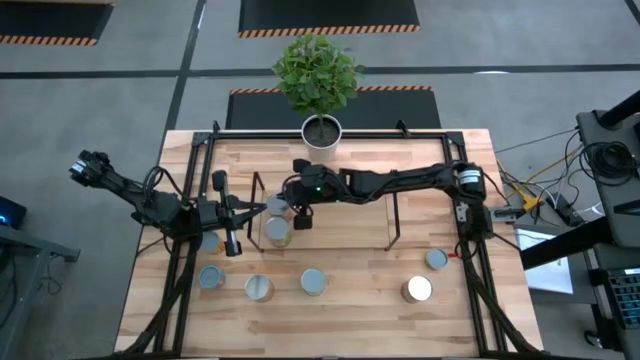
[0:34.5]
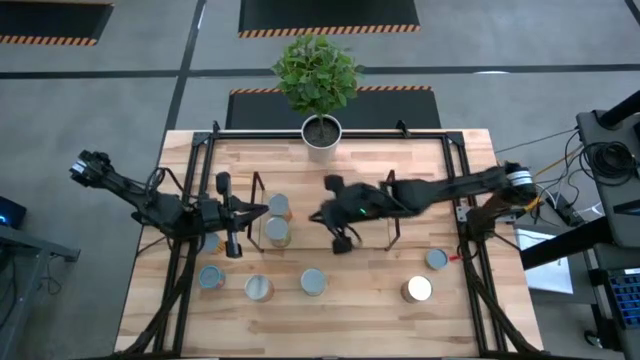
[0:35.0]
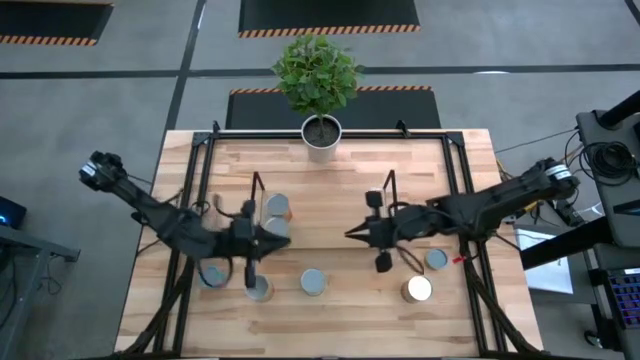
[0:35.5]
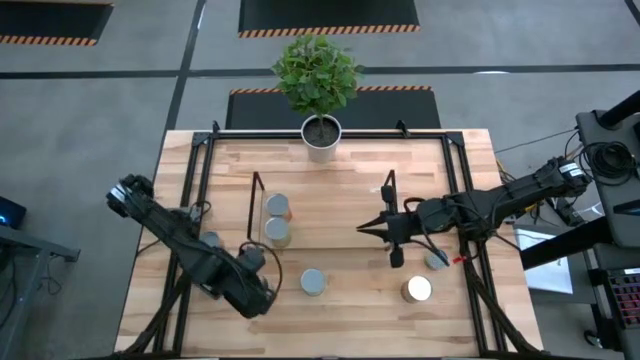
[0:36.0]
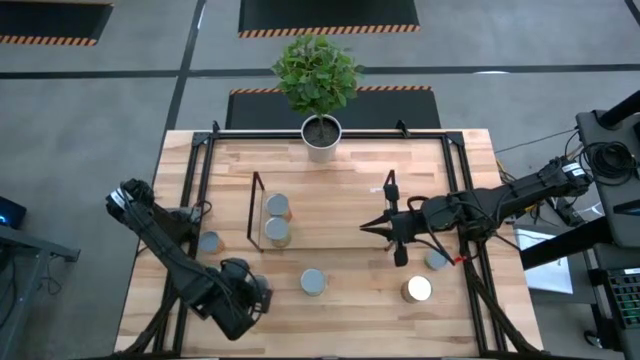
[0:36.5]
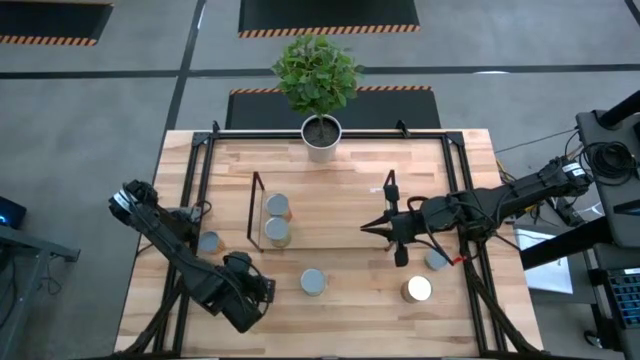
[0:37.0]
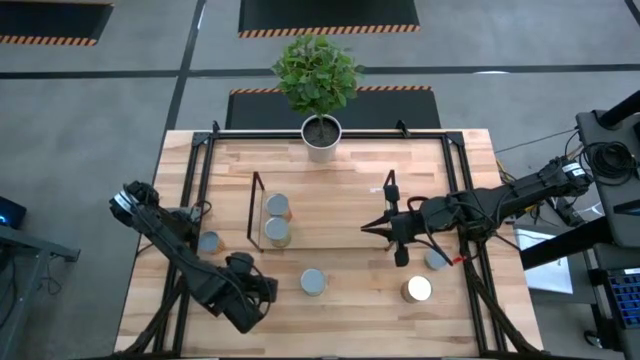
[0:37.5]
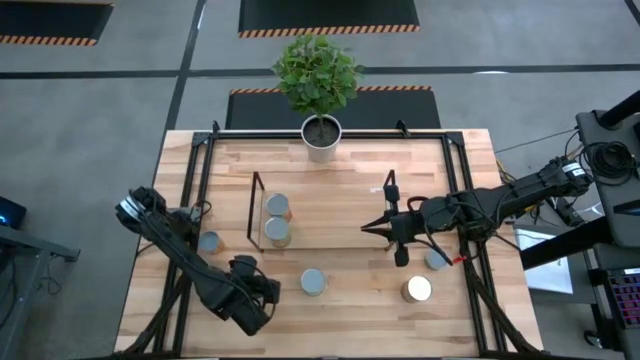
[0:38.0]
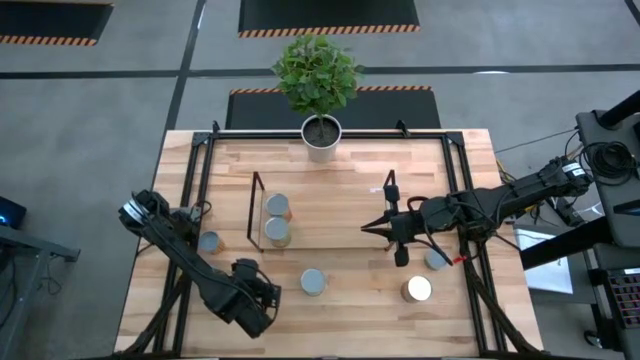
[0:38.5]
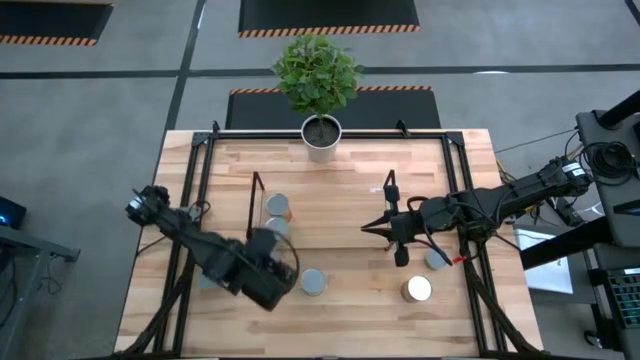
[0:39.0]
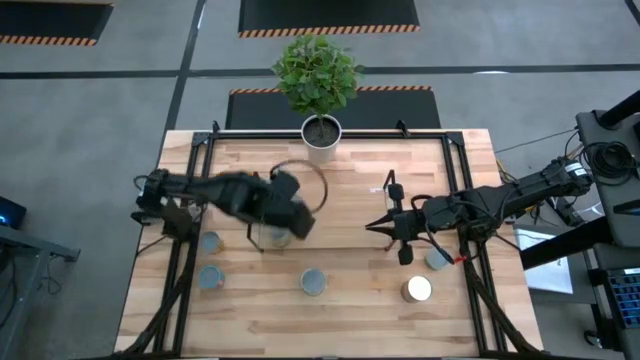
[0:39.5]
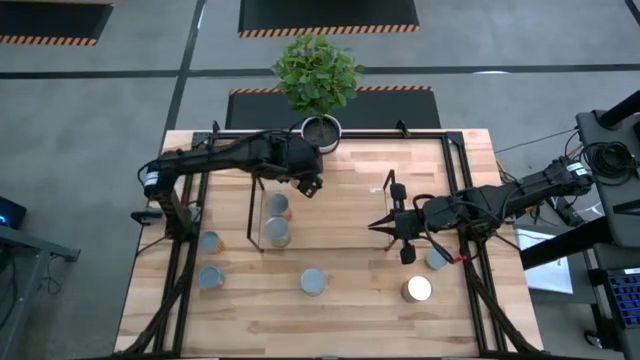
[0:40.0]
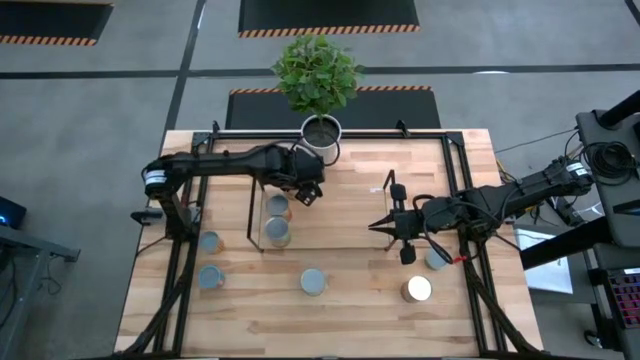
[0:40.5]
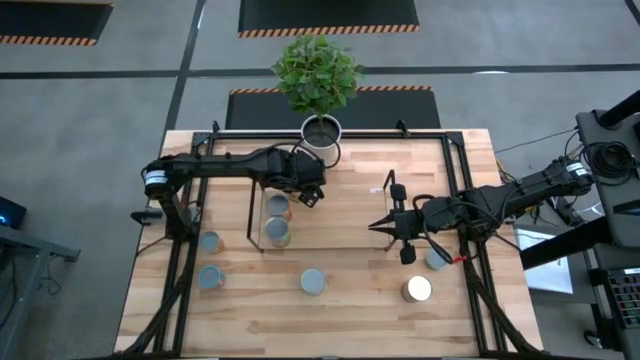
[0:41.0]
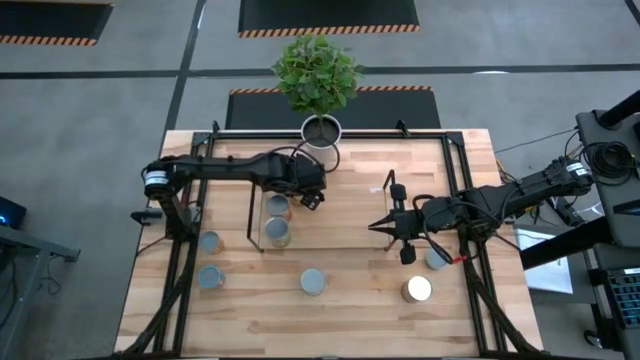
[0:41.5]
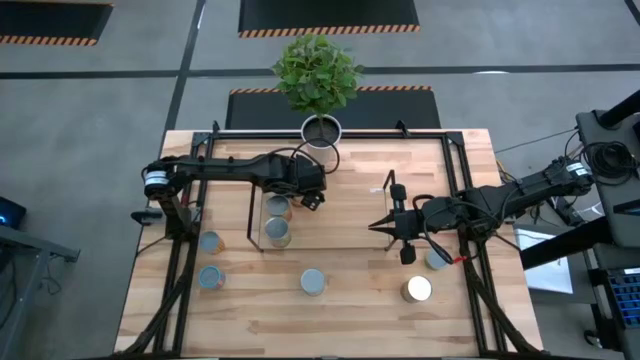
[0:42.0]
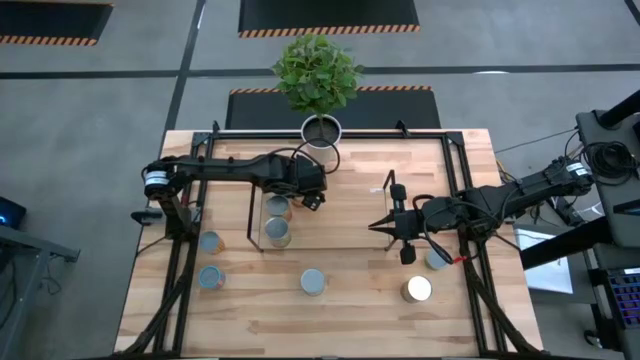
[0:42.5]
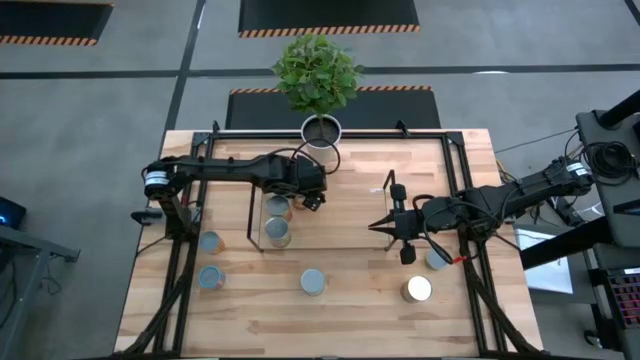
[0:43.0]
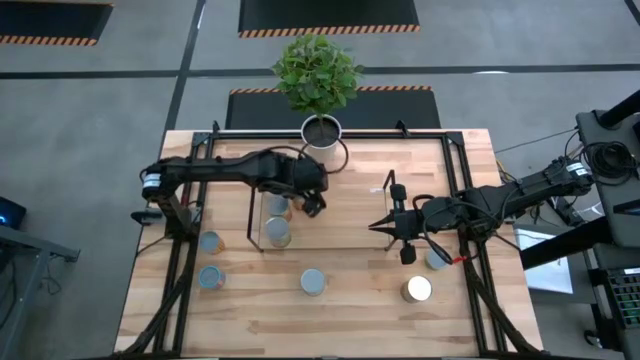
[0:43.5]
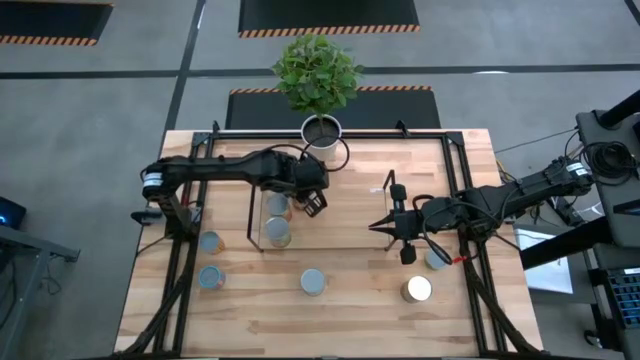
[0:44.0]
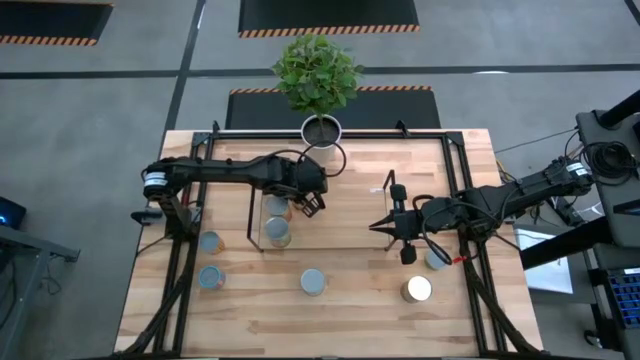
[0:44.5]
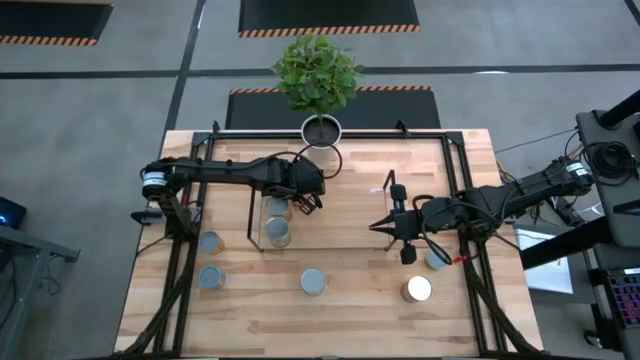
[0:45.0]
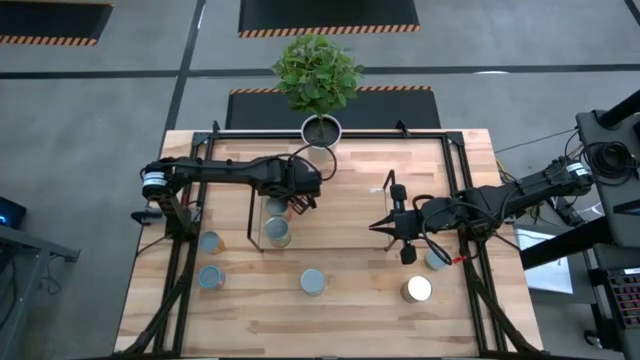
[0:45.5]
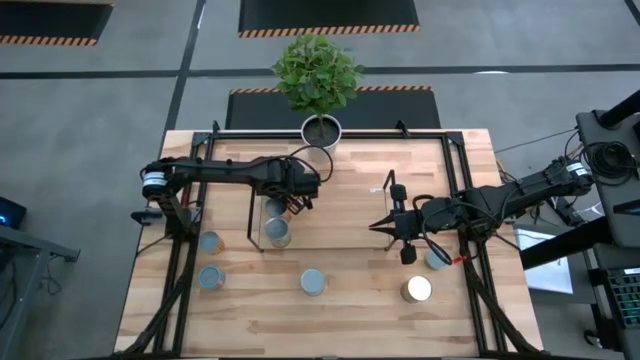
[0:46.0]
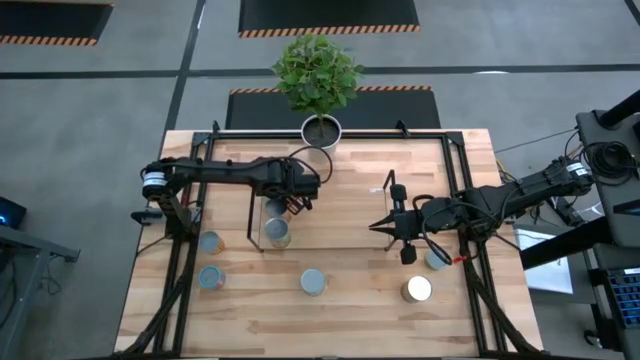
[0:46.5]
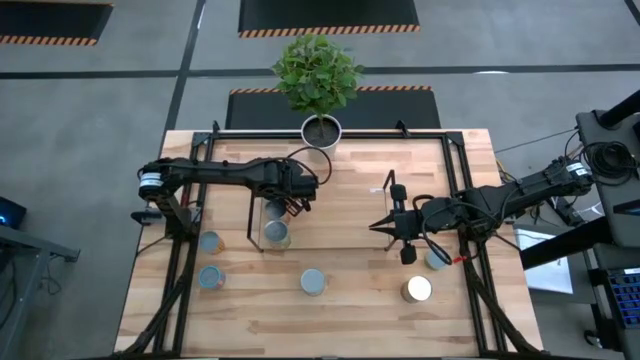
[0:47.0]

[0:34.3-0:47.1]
Task: Pick and place cans onto a shelf
Put the right canned corn on the shelf

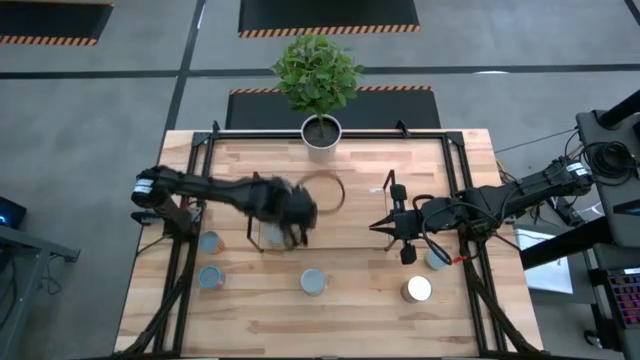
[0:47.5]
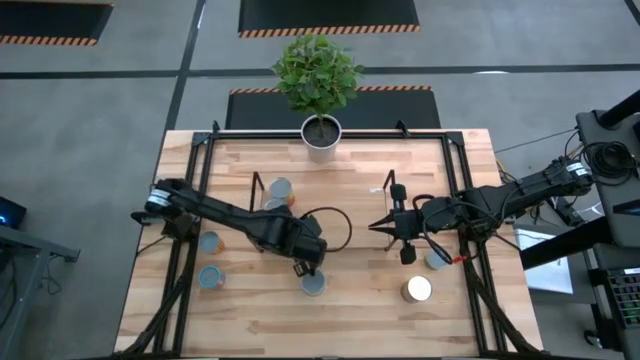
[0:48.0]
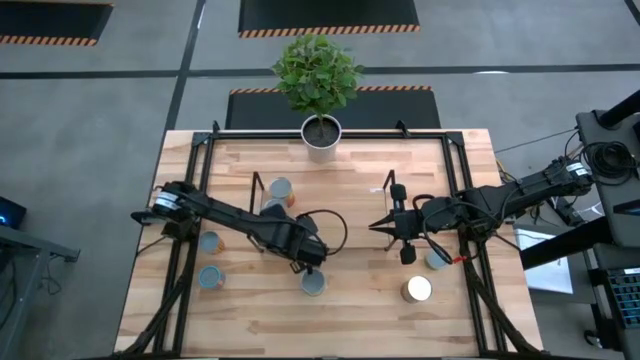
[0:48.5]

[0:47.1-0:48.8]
Adjust the canned oranges on the shelf

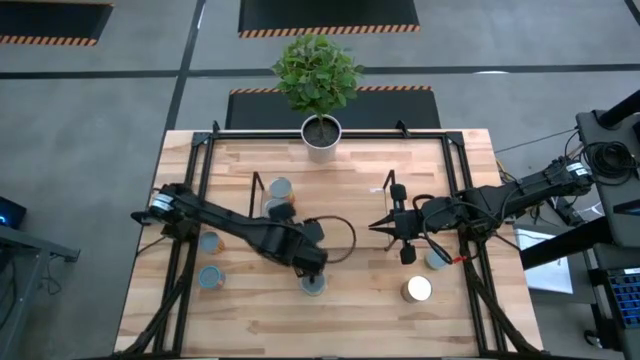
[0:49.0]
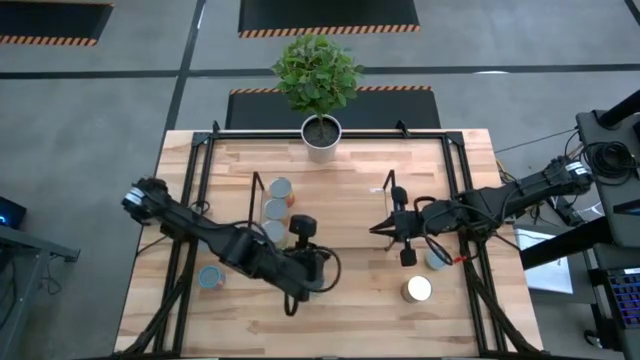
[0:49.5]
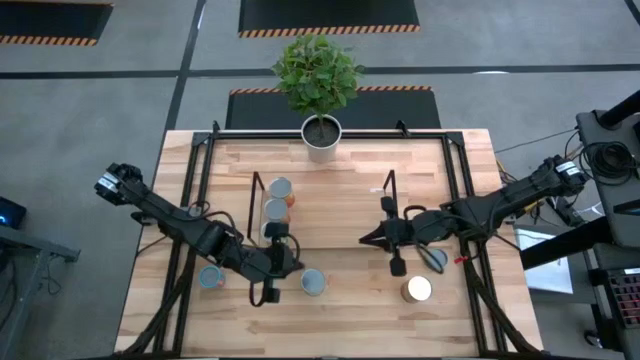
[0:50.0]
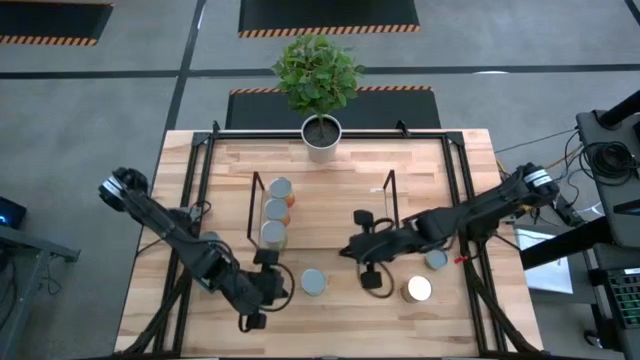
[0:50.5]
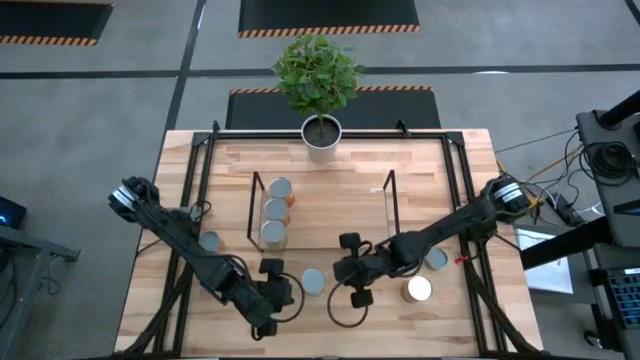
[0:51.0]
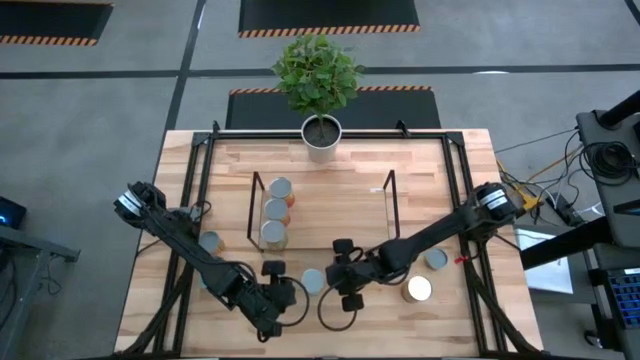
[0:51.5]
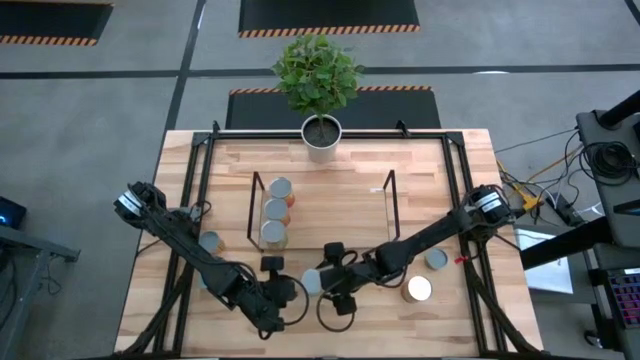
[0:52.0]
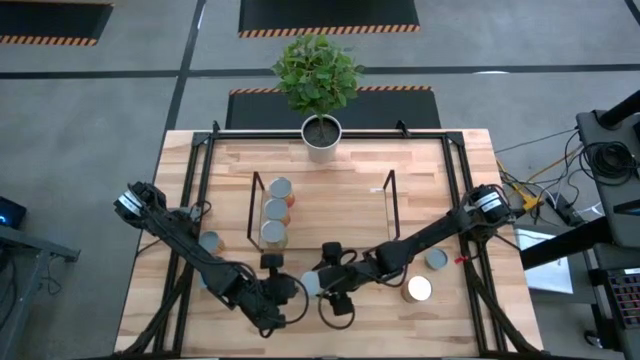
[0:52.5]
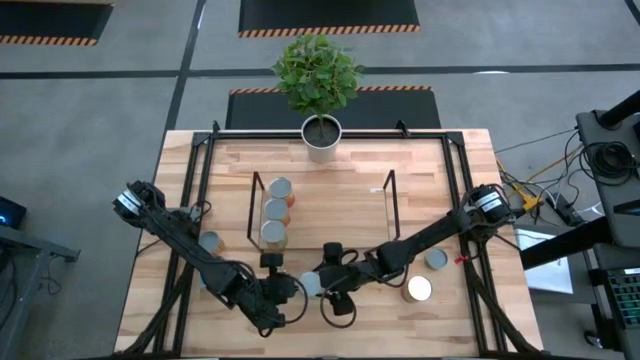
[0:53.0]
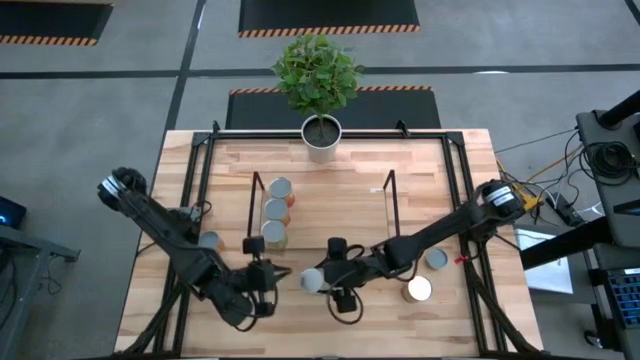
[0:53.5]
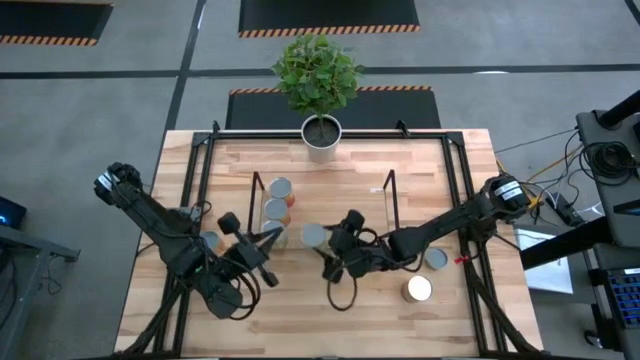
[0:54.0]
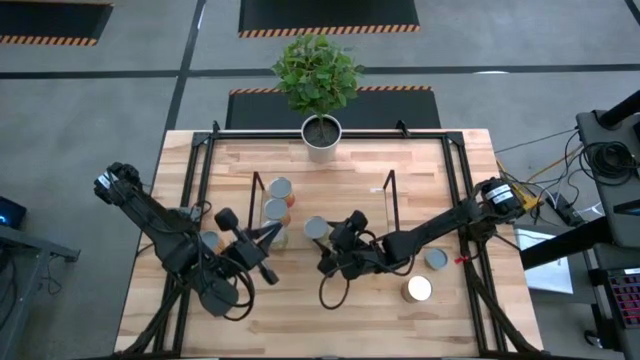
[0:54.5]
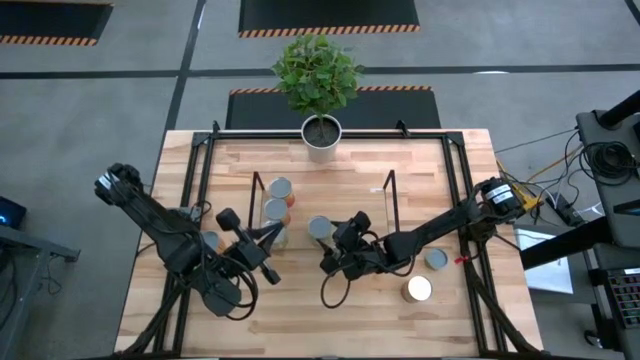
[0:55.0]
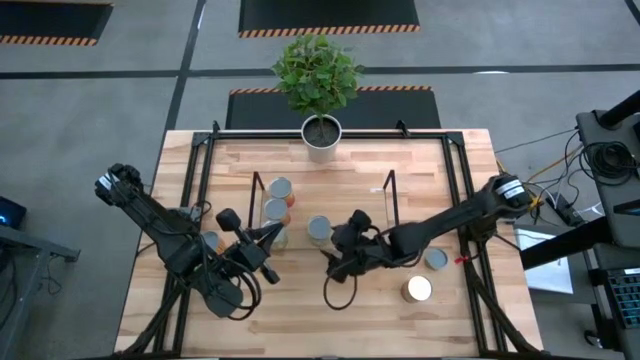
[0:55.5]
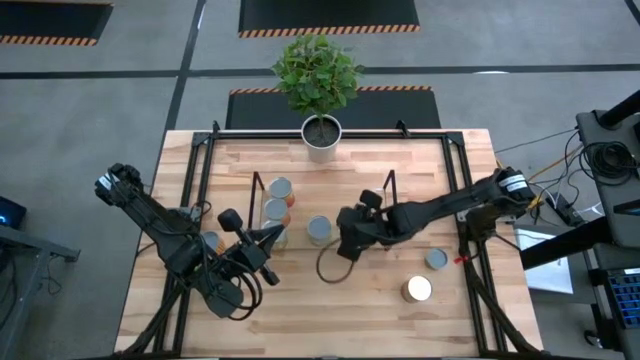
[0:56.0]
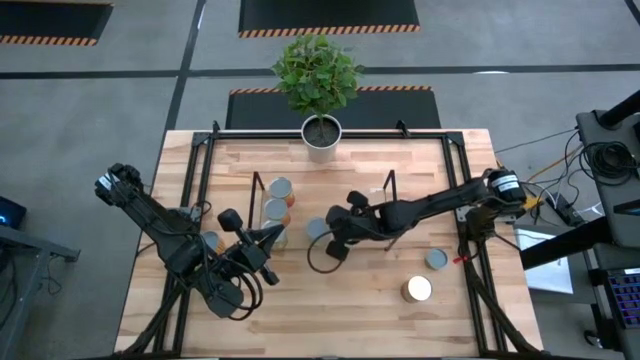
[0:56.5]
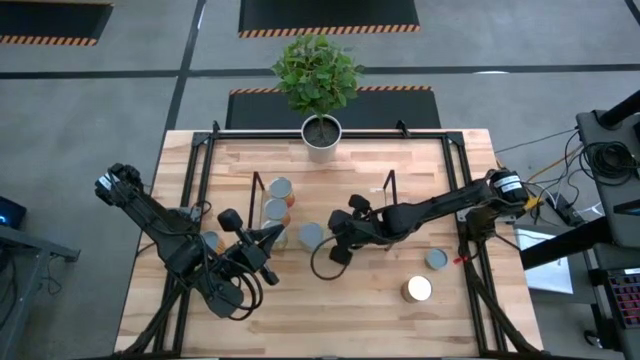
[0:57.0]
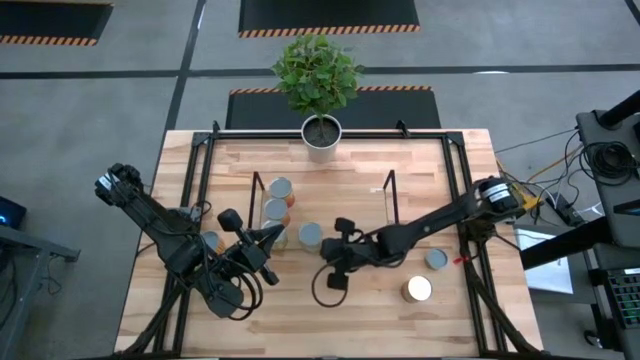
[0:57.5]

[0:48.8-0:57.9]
Put the canned pears on the shelf
